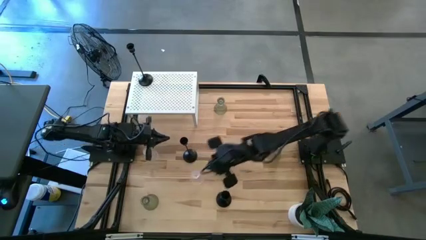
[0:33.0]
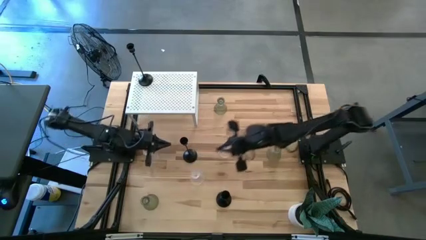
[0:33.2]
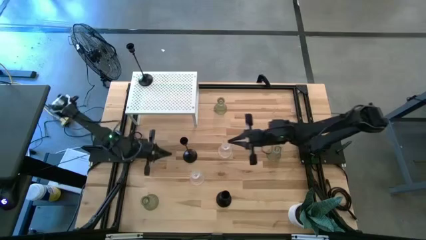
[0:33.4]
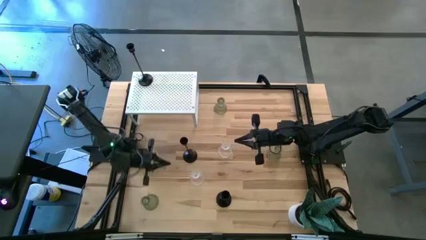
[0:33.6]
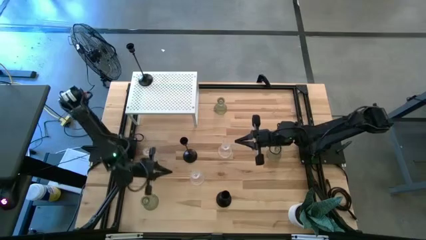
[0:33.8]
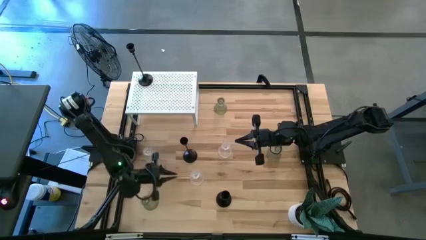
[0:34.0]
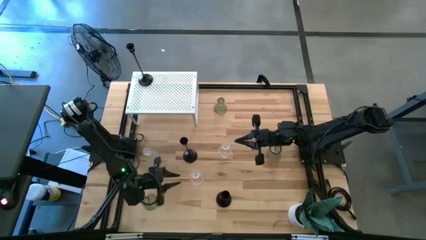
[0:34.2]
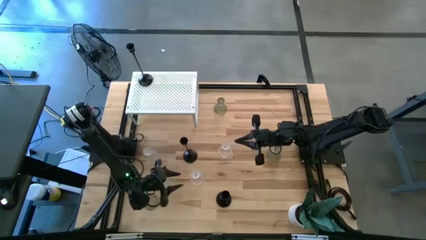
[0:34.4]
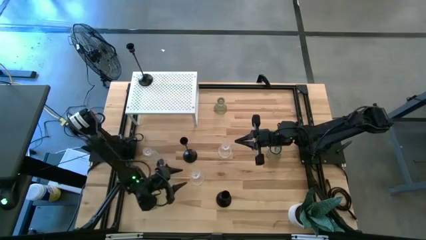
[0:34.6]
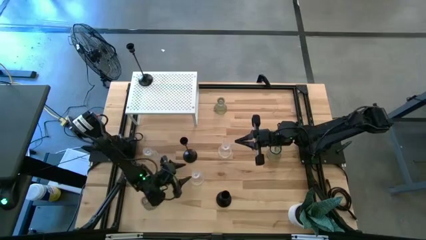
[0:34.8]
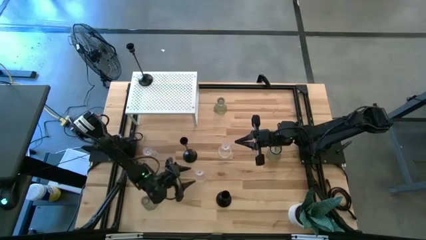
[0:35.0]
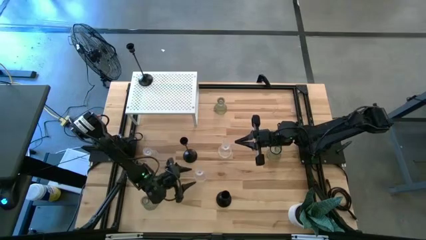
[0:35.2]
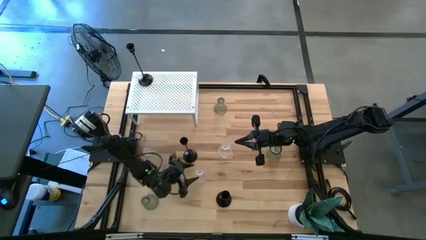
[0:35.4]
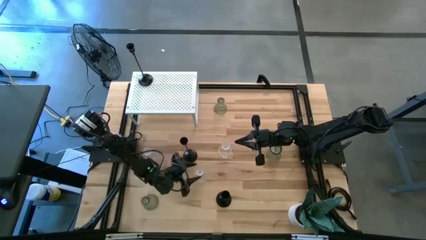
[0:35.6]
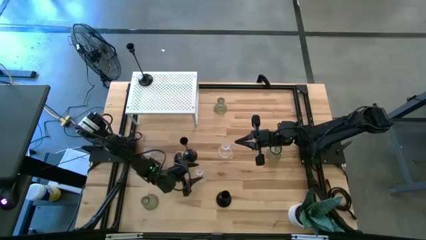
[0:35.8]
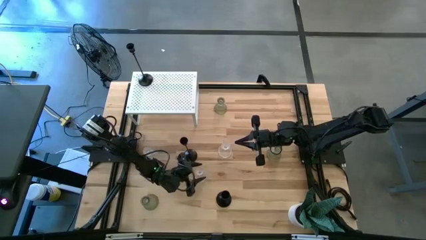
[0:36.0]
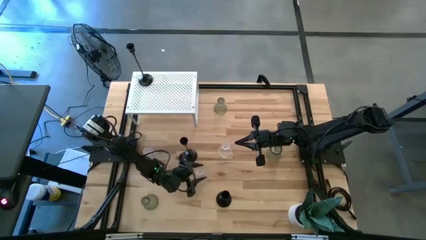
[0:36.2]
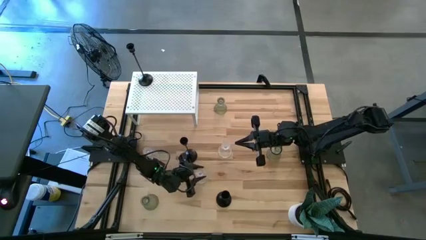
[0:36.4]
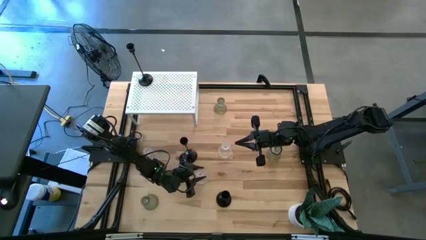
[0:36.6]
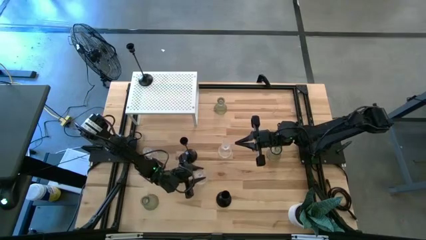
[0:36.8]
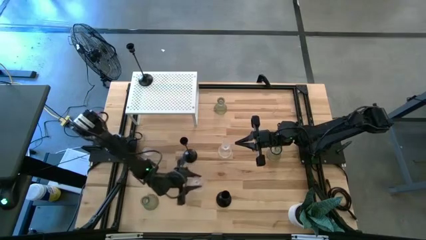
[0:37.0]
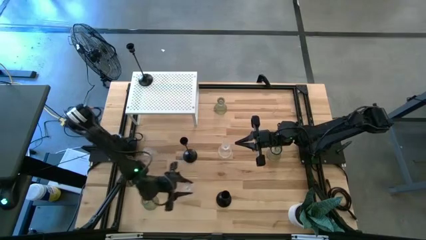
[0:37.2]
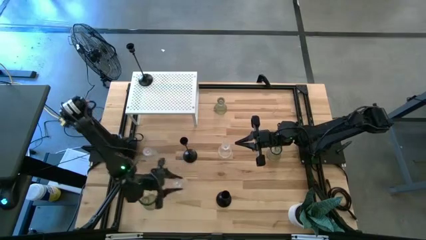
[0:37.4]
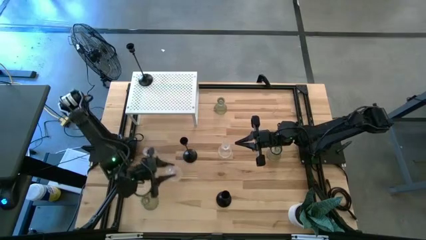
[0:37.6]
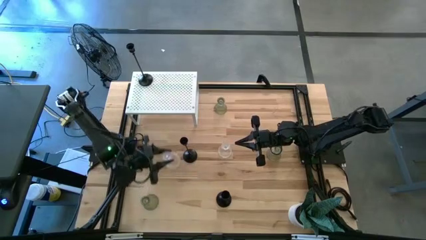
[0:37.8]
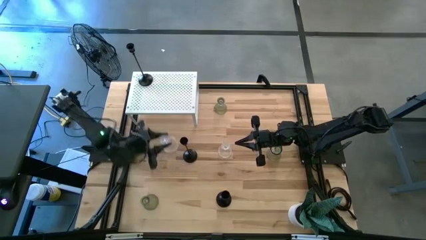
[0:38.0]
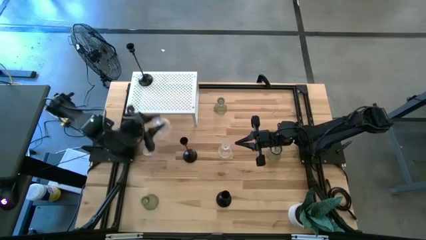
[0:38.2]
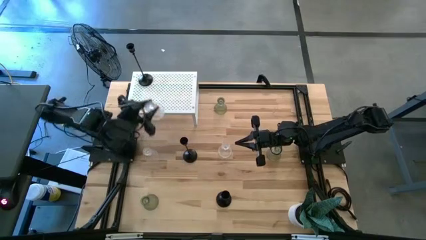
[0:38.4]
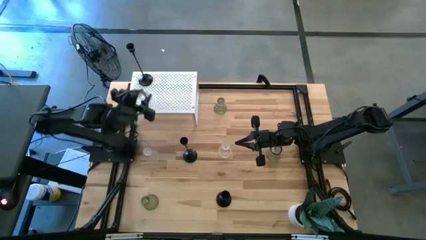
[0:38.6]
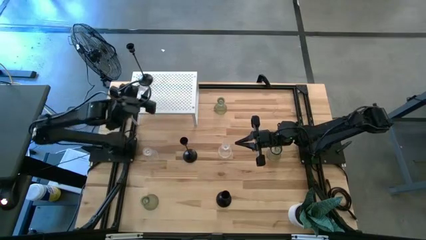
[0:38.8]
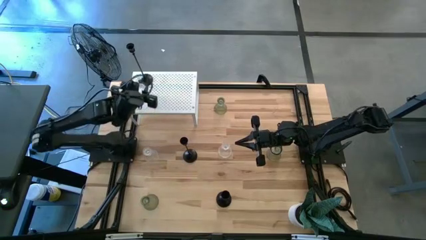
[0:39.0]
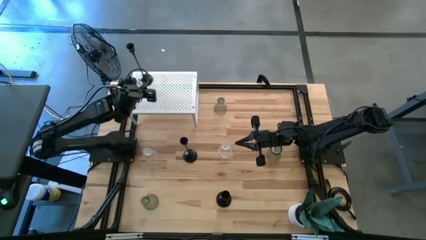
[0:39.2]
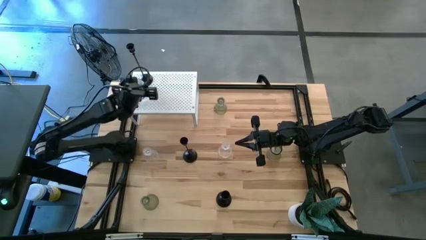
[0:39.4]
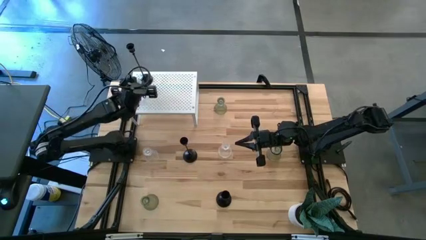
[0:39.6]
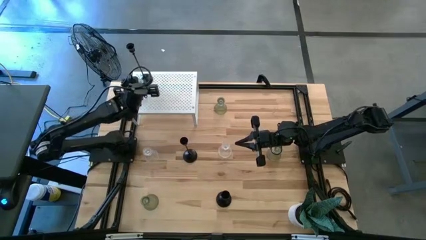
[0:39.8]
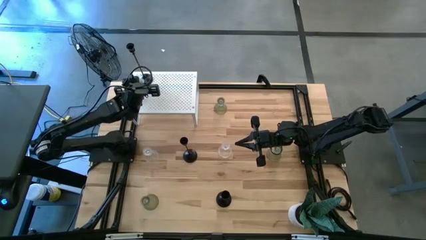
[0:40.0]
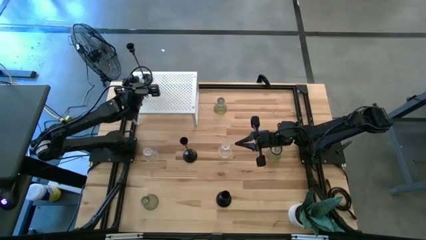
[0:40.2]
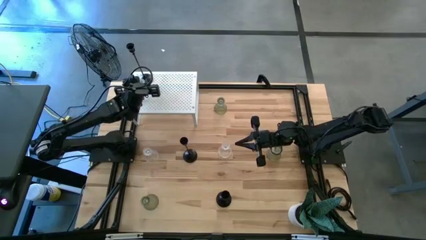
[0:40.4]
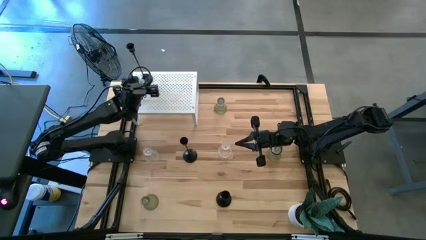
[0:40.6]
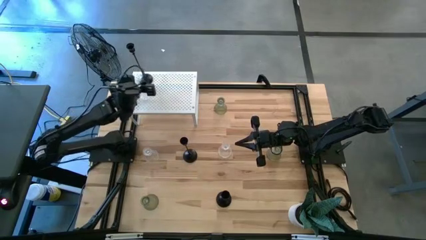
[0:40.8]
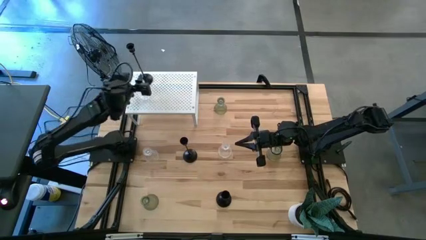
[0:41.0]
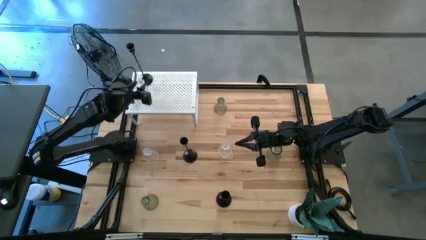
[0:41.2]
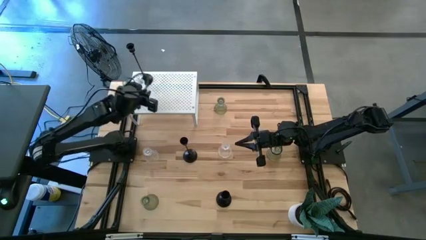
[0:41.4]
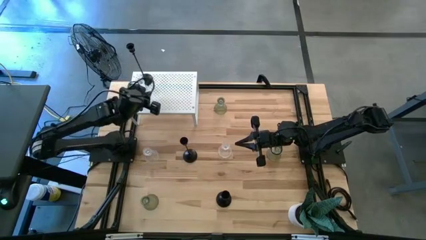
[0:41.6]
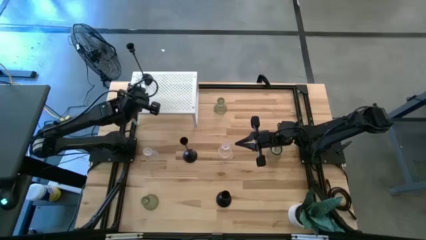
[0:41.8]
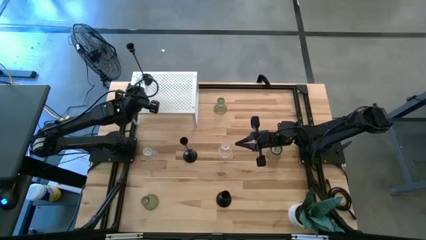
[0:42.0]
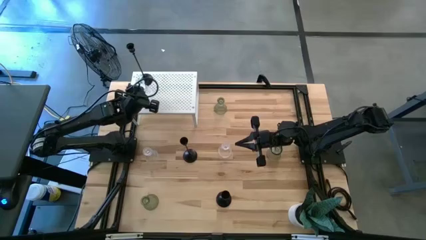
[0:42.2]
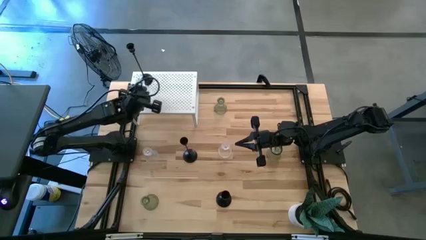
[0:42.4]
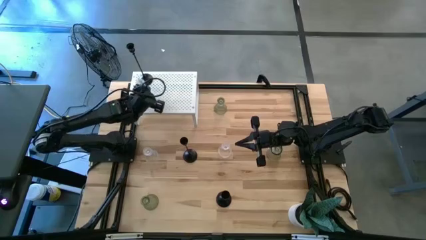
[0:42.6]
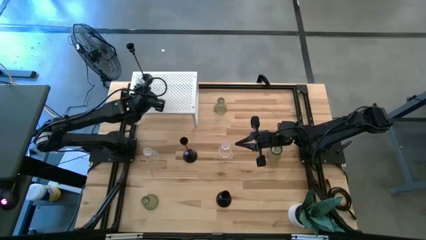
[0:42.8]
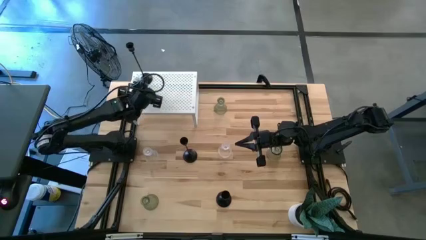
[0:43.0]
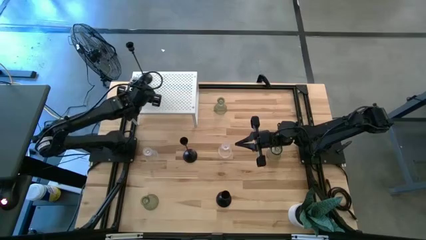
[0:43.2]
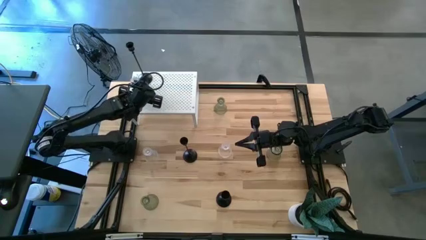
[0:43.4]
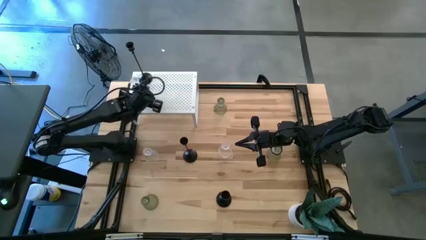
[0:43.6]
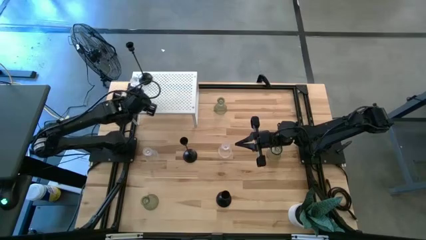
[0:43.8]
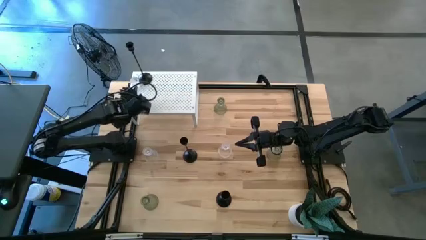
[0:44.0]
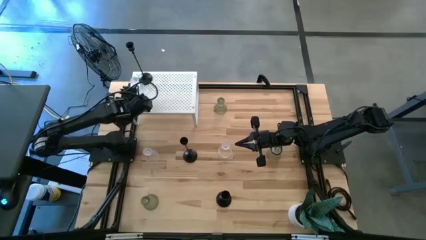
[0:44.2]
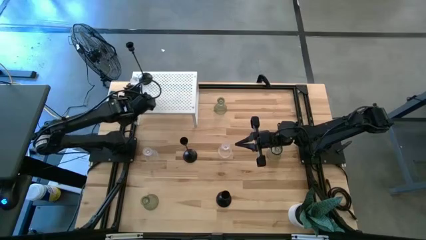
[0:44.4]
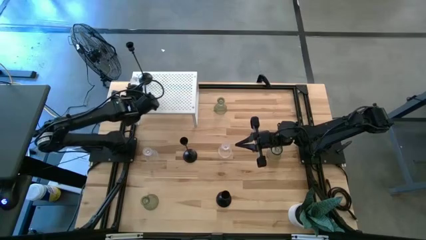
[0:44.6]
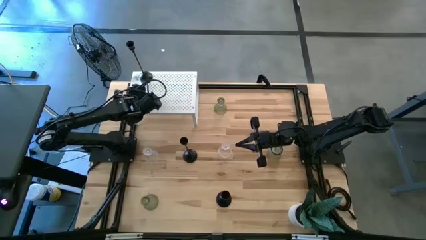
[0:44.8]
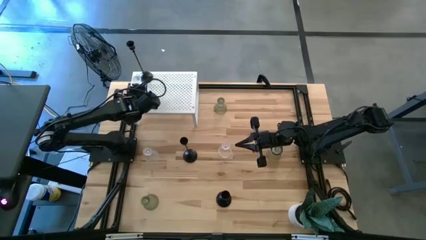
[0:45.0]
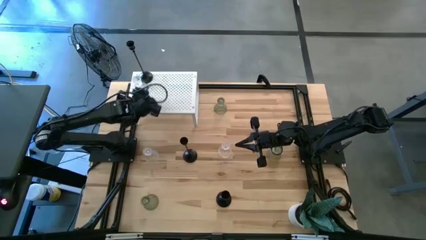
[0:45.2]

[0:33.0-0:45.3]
Task: Pick & Place candle stick holders
Put the bottom transparent candle holder on the shelf

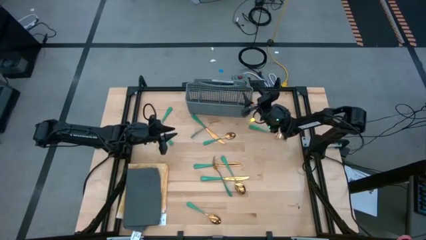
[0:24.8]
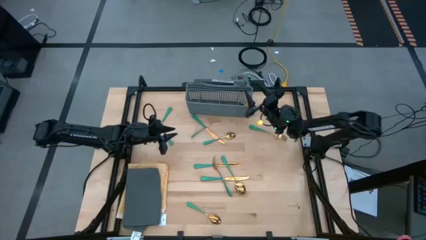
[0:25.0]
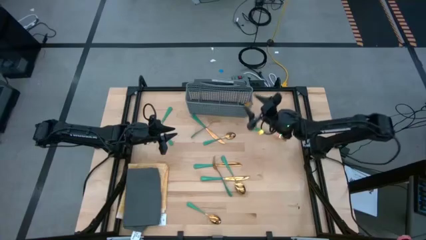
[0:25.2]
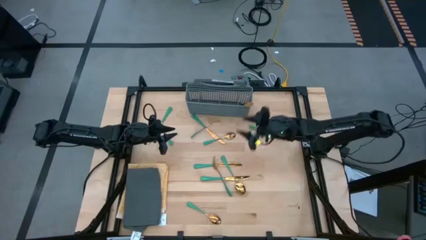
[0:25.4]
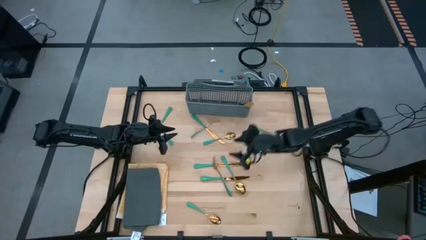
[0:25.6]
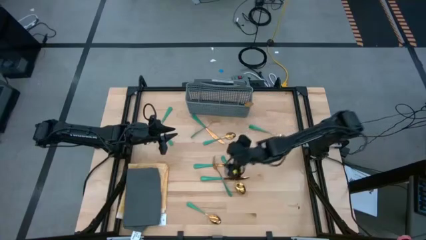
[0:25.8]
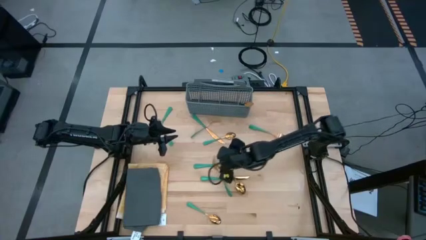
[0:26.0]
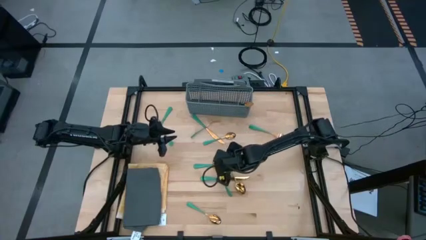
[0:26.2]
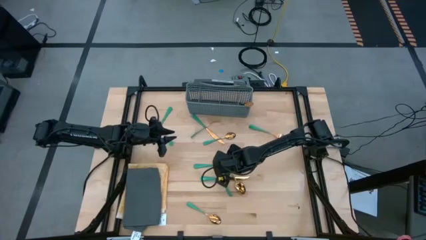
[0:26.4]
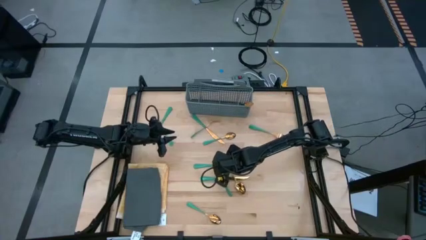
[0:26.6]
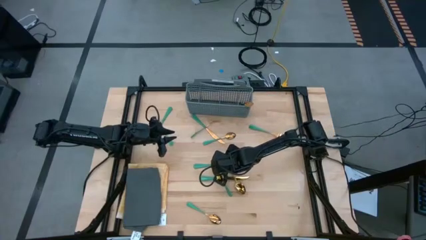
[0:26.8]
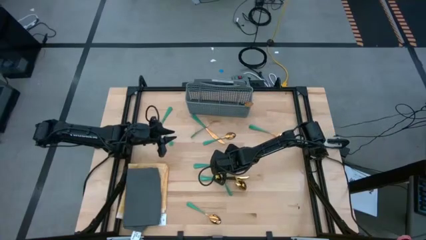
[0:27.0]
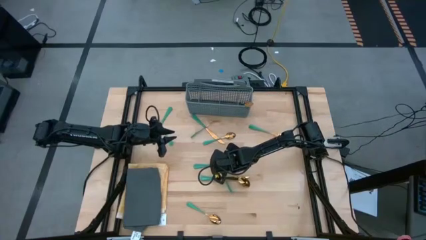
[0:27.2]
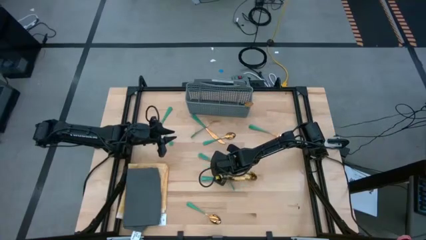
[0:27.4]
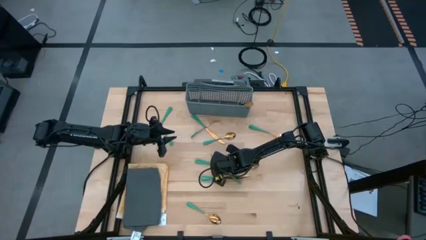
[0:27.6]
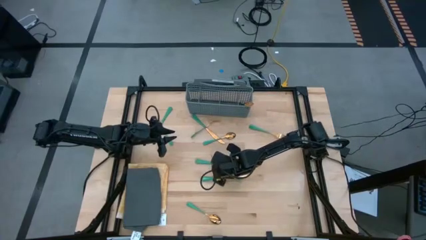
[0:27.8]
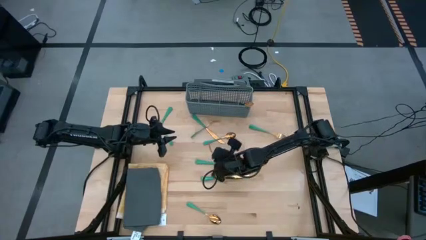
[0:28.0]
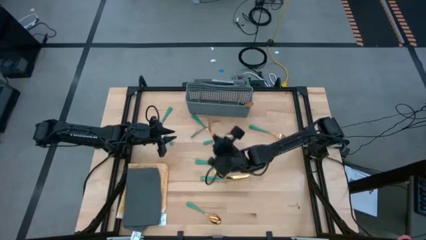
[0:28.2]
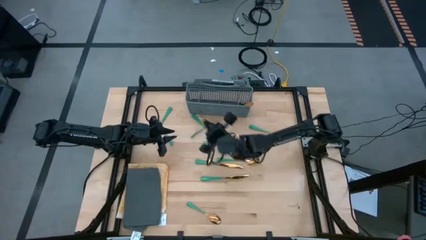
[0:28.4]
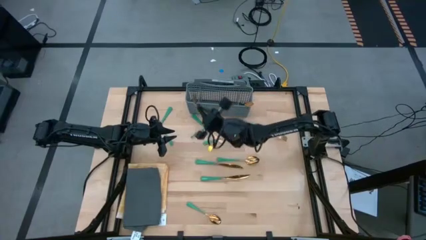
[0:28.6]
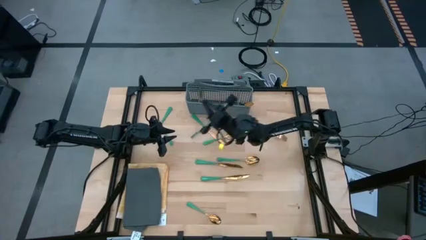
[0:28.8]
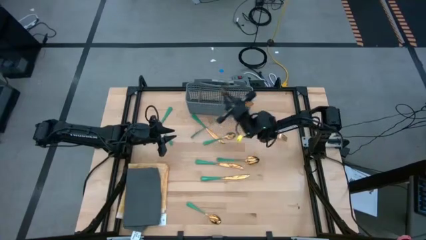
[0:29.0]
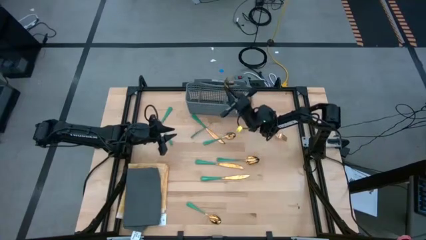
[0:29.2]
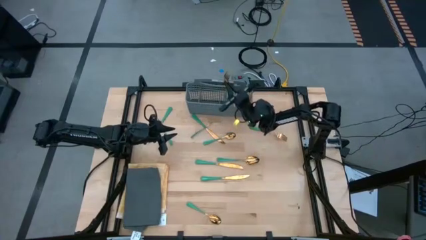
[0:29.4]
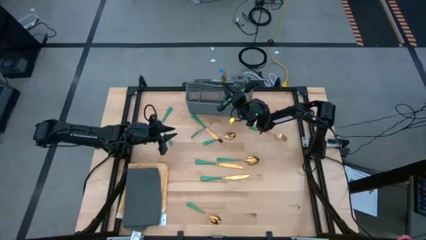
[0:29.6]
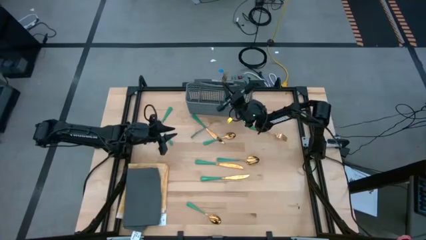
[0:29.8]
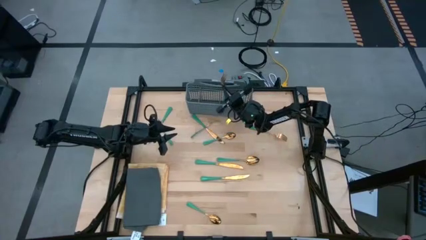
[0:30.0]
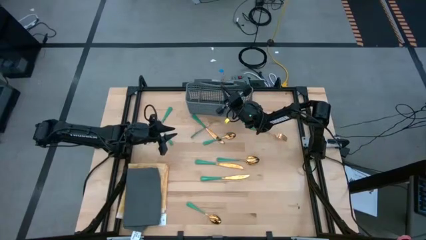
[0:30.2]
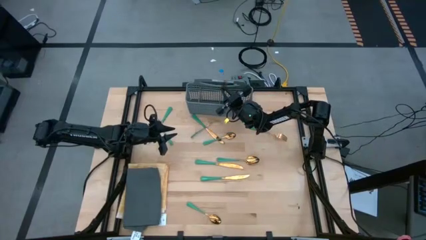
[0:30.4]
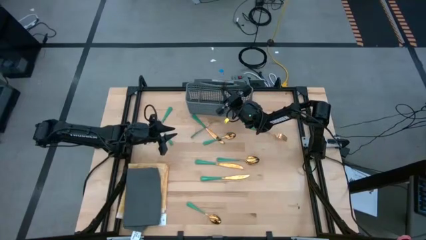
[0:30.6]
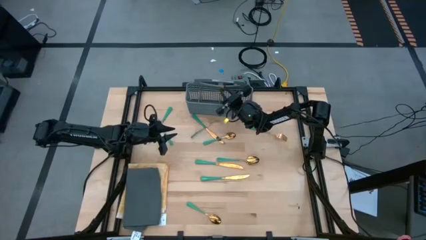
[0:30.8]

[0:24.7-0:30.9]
Task: Sort silverware
Put the green fork into the dishwasher utensil holder
